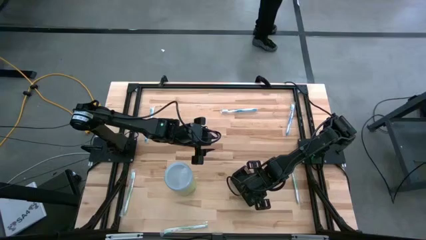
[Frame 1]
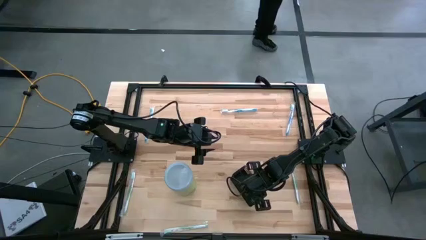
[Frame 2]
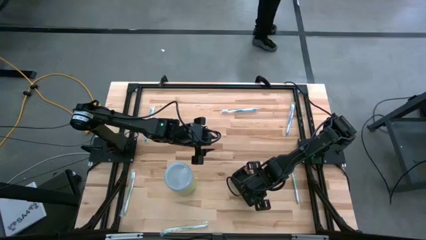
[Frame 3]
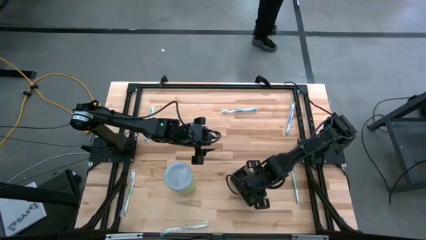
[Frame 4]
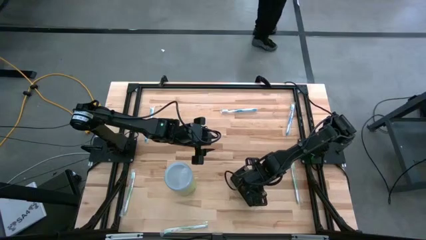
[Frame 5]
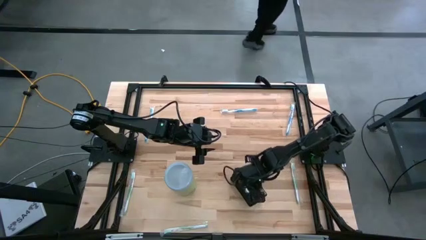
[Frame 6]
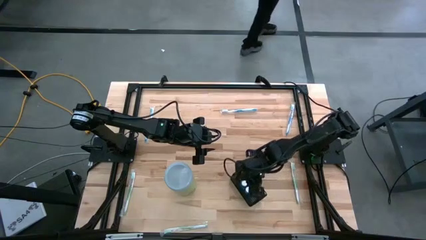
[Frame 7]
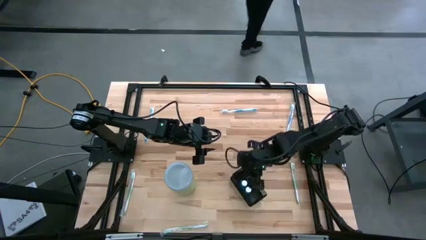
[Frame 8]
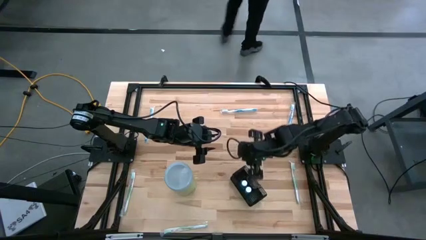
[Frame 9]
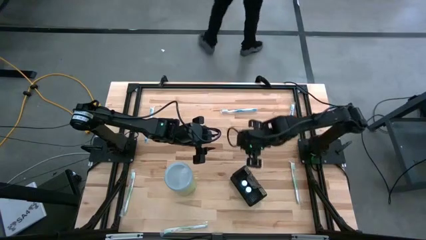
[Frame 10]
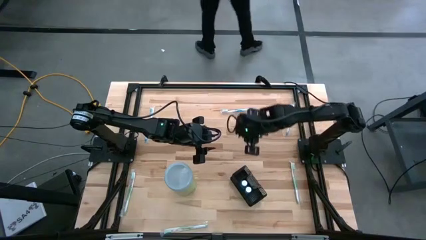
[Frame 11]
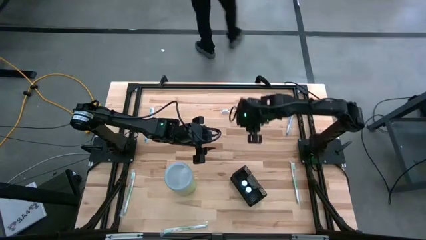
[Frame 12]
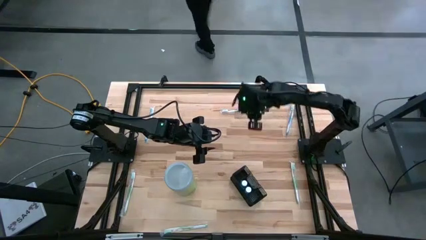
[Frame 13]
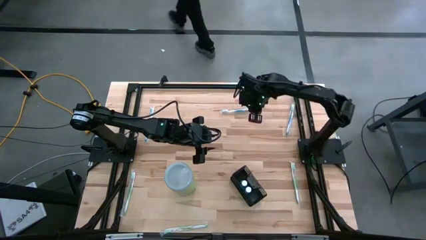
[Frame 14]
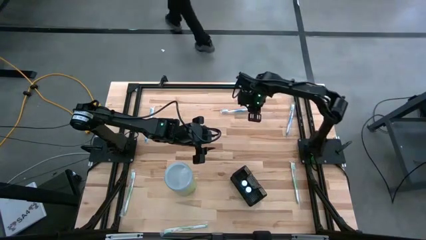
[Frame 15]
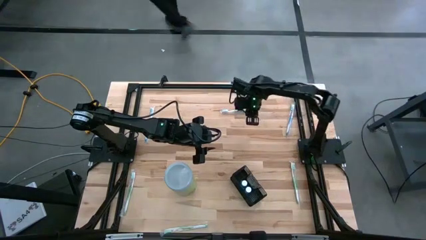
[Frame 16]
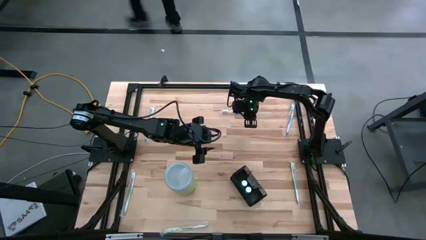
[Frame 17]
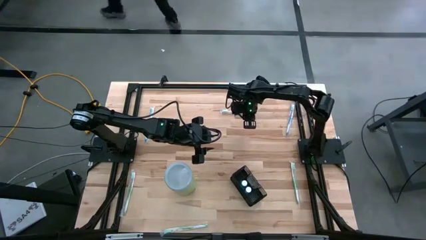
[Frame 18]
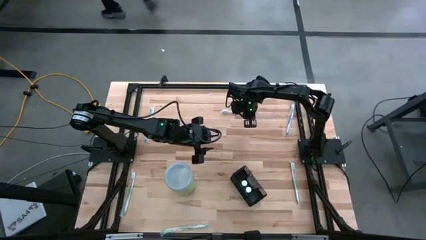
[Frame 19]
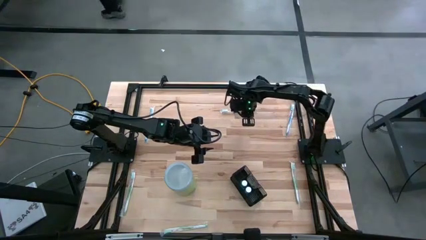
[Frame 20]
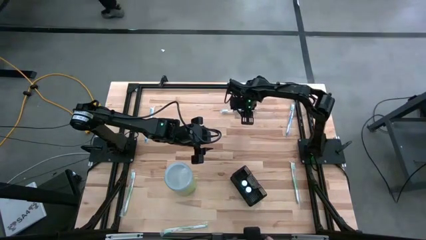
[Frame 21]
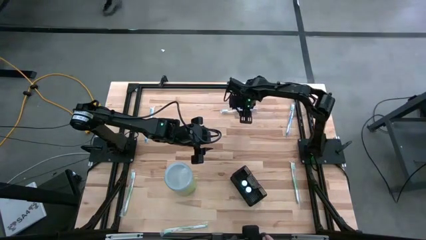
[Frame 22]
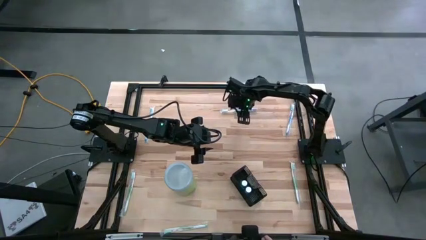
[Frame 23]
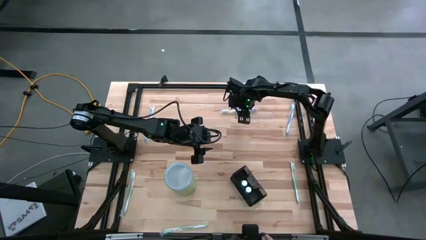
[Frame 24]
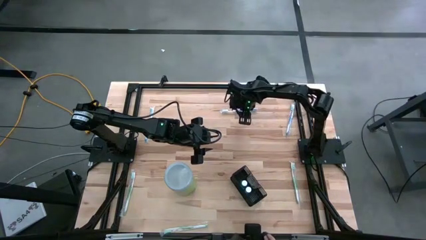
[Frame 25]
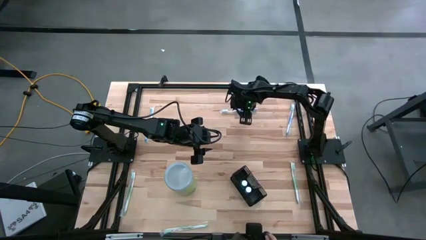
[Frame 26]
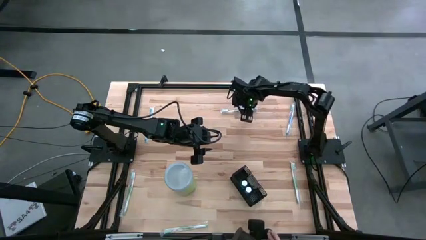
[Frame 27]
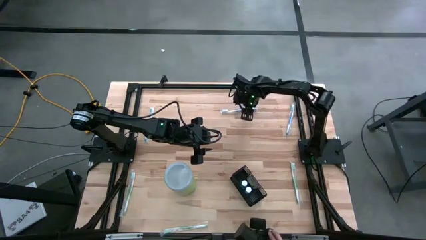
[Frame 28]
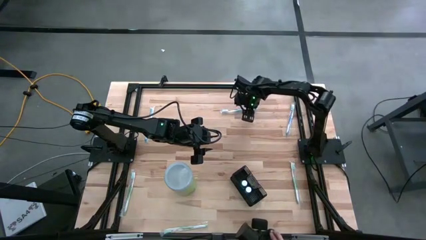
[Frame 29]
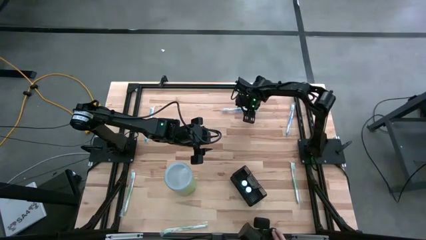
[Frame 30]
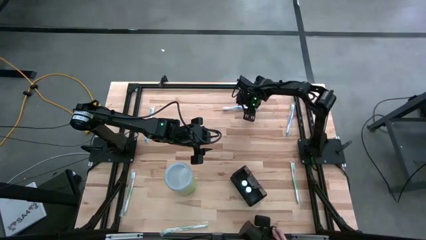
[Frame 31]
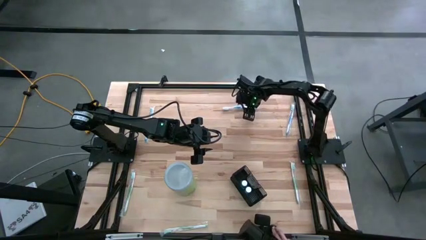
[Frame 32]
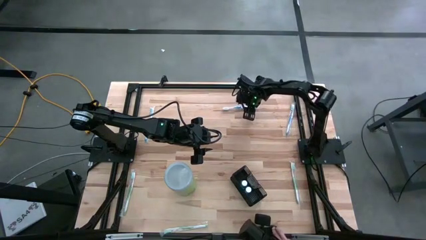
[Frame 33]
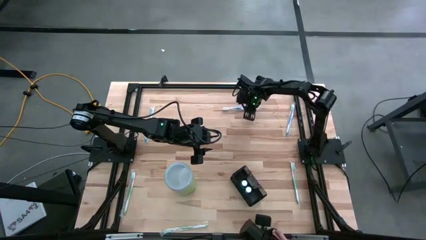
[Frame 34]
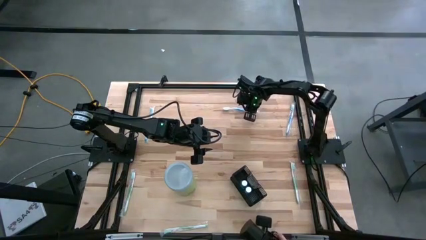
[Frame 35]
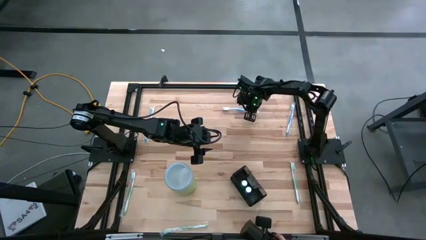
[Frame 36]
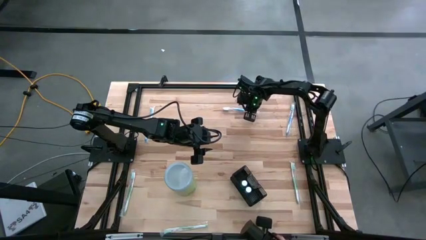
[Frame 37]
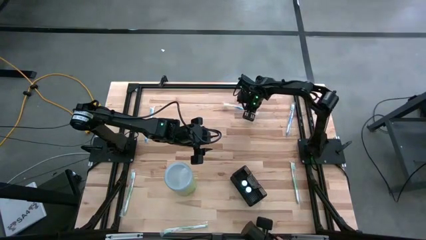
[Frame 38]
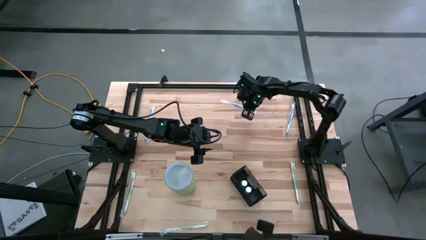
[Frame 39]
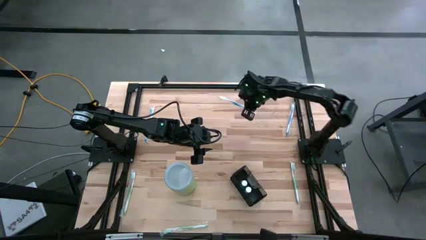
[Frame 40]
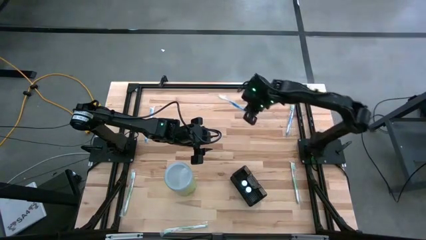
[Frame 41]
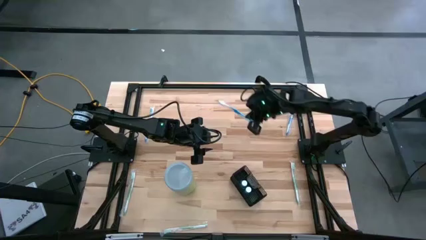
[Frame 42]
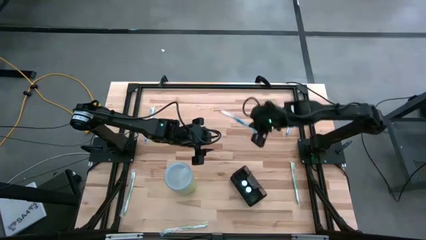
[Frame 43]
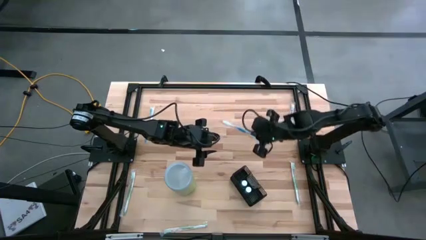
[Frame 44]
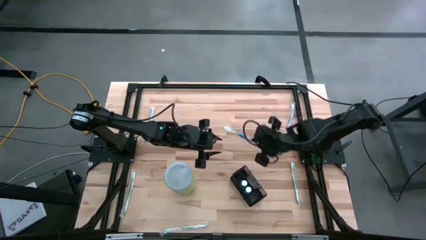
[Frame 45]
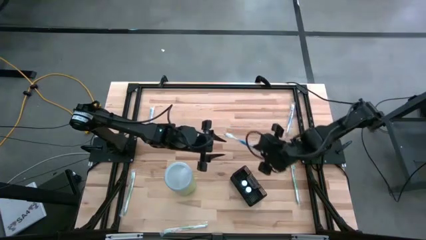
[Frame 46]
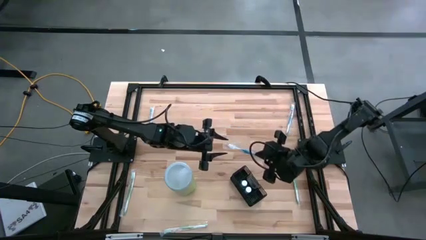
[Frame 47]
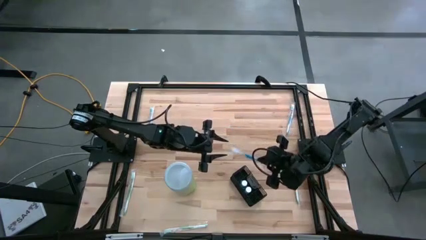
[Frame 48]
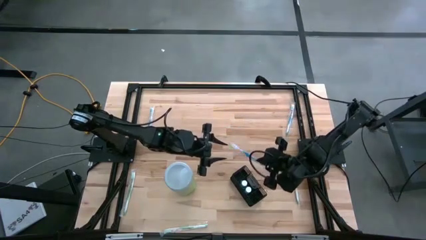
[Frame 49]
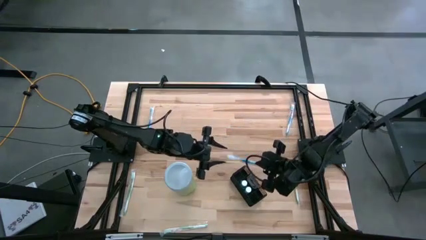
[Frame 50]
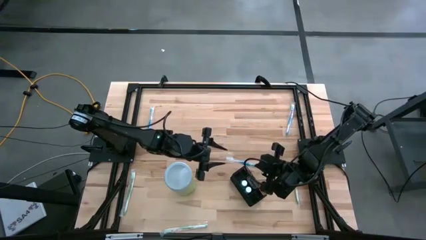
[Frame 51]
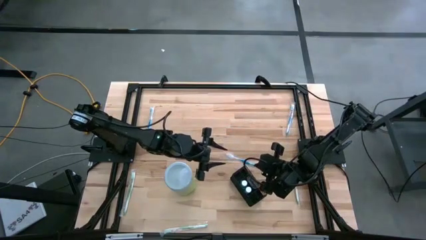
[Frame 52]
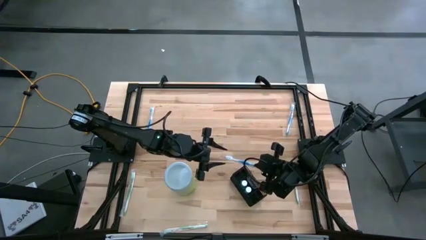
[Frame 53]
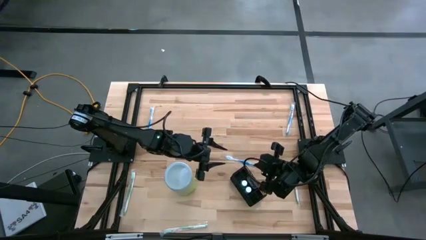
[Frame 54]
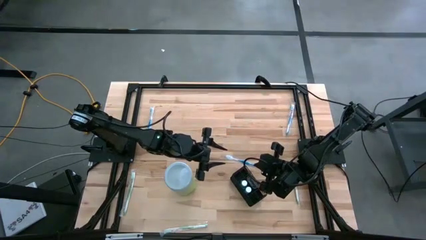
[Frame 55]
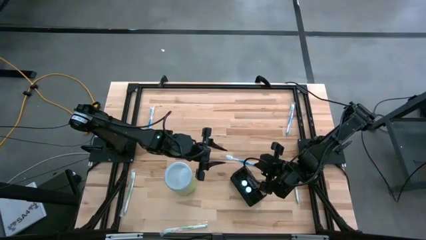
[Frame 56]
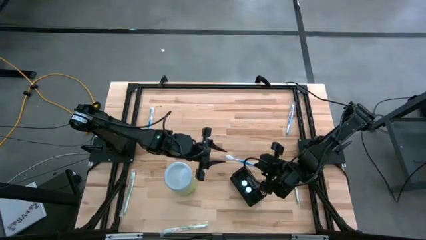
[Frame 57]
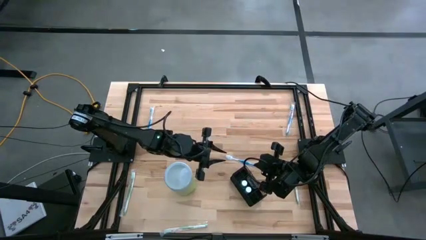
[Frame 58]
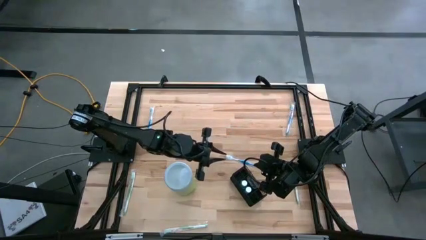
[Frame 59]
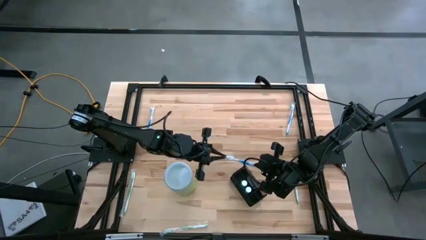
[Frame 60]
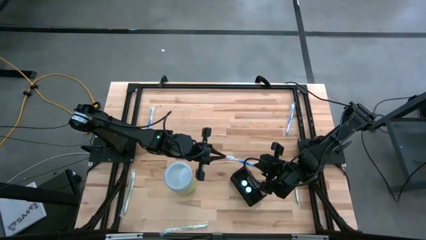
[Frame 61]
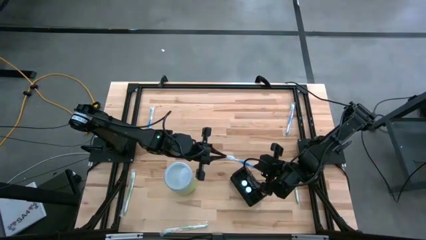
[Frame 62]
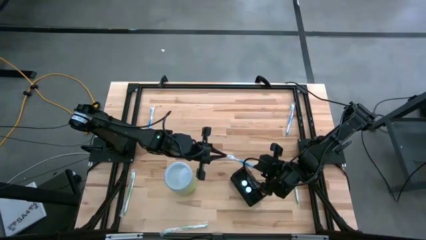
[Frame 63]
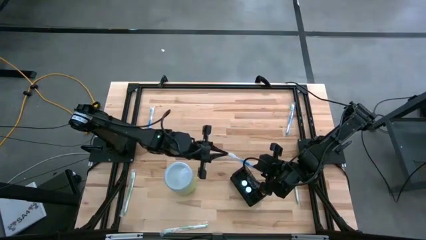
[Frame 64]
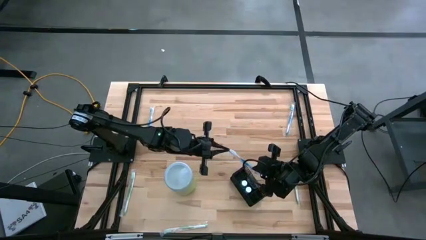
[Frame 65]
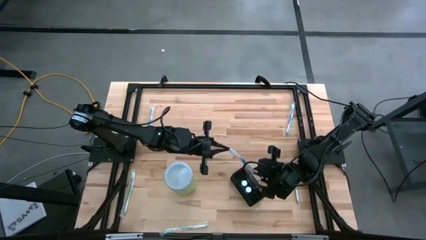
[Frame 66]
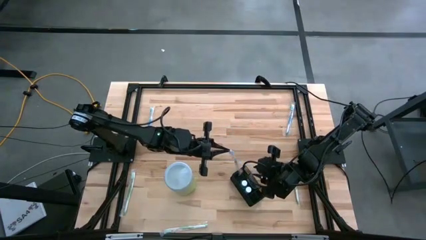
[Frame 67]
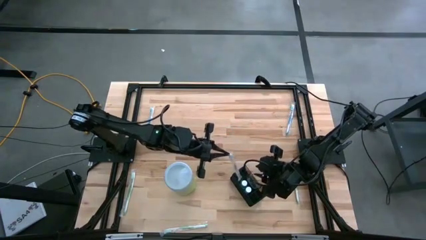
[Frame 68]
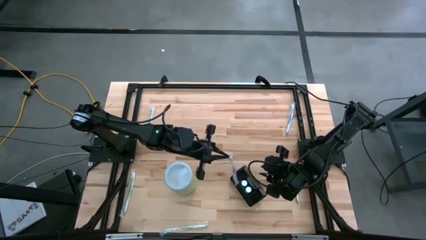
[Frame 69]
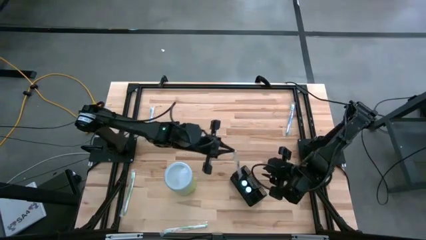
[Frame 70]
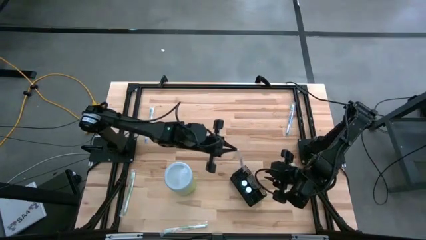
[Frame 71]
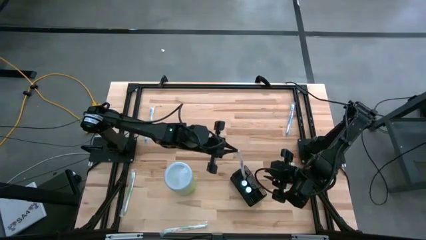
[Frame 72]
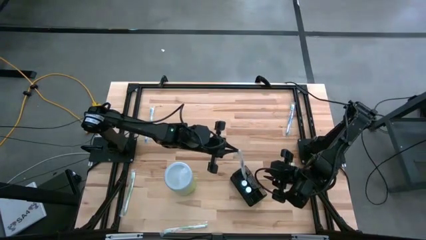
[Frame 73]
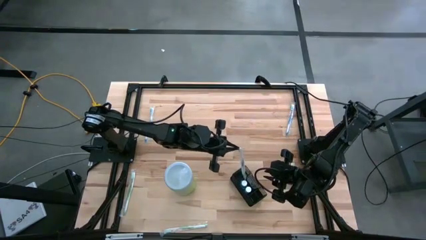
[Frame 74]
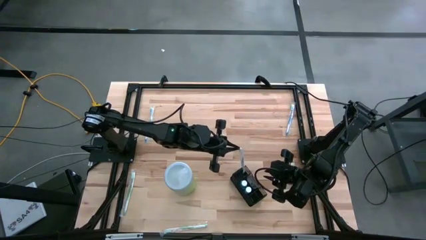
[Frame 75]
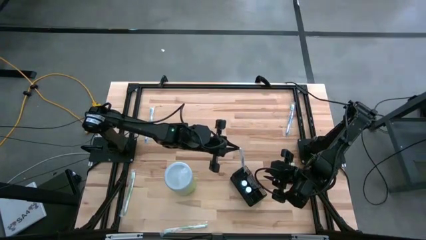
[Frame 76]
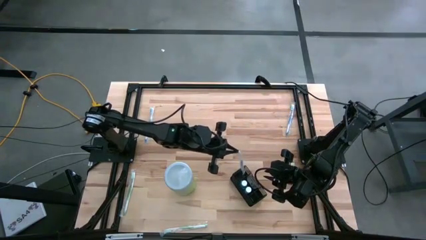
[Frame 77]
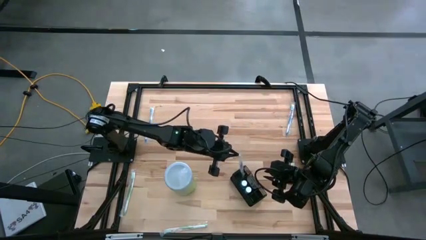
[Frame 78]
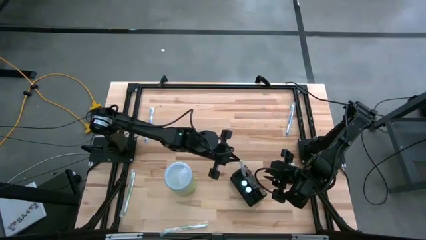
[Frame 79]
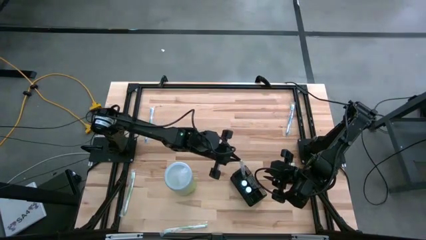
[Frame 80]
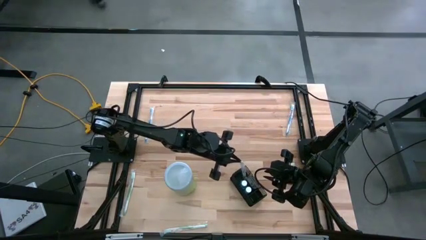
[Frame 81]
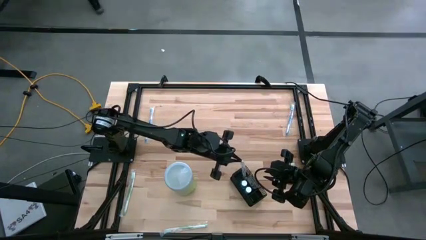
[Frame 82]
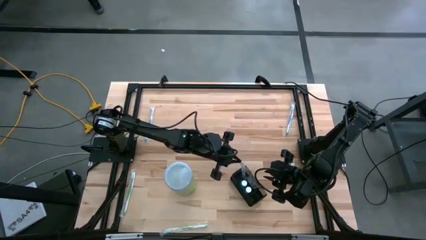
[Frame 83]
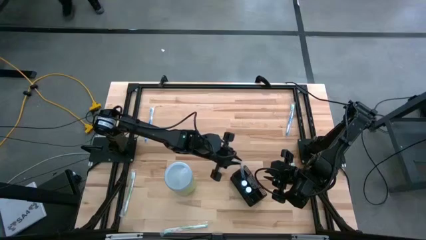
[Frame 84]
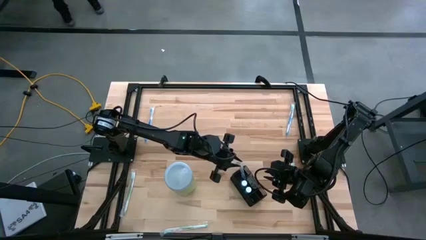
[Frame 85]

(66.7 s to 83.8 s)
Task: Pick & Place toothbrushing station
Put the middle blue toothbrush into the black mesh organizer
